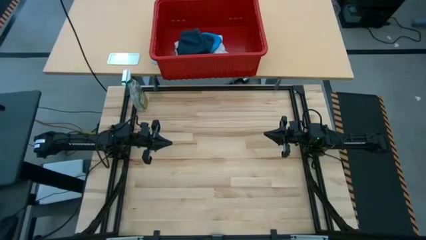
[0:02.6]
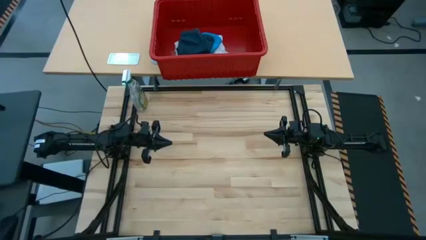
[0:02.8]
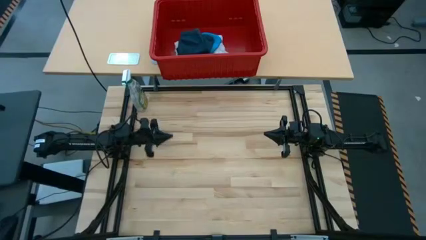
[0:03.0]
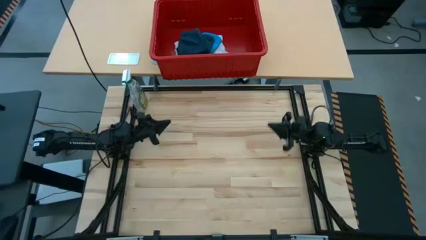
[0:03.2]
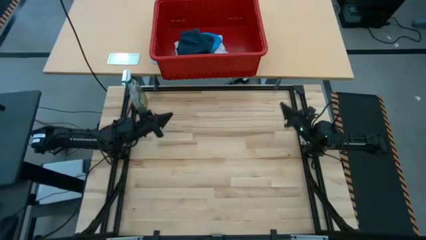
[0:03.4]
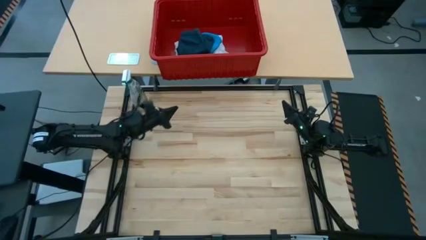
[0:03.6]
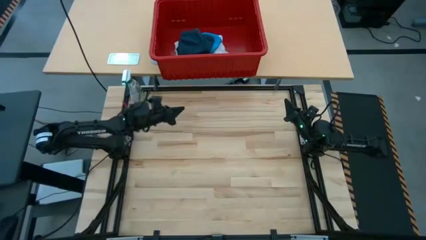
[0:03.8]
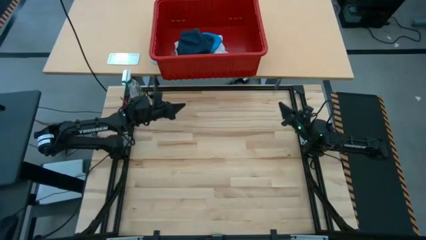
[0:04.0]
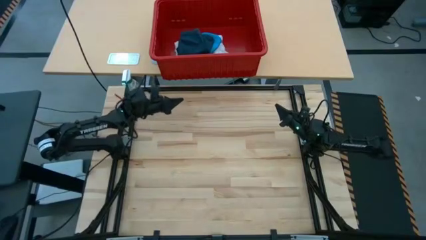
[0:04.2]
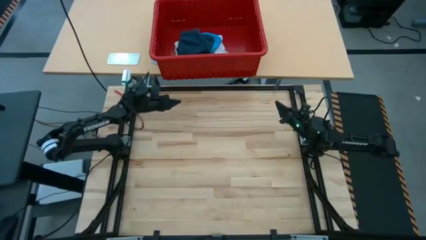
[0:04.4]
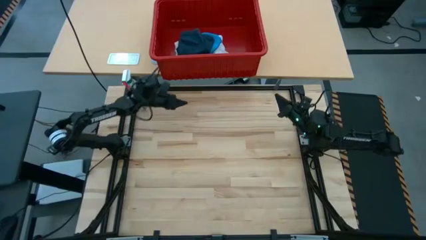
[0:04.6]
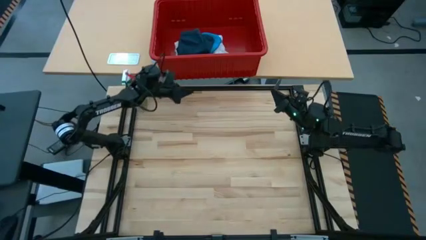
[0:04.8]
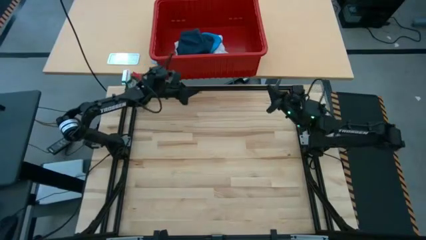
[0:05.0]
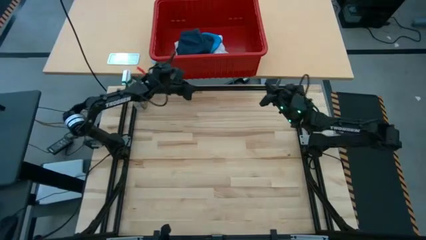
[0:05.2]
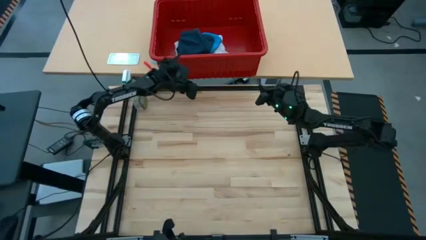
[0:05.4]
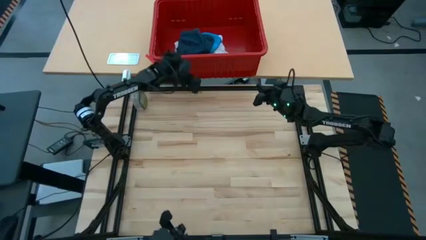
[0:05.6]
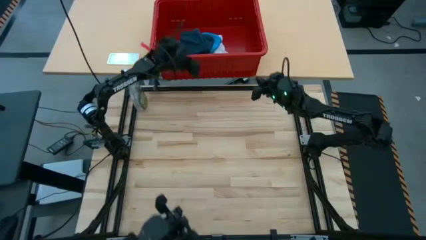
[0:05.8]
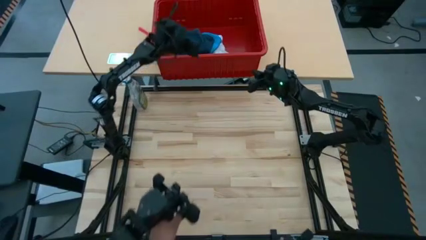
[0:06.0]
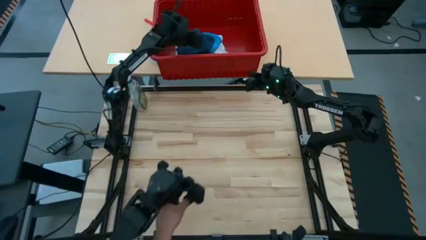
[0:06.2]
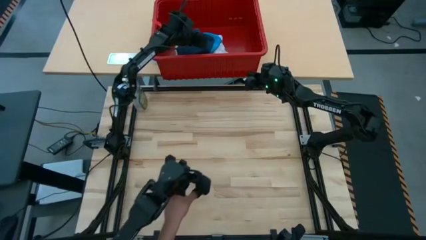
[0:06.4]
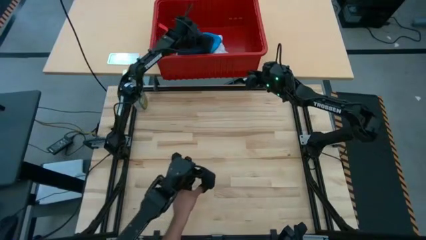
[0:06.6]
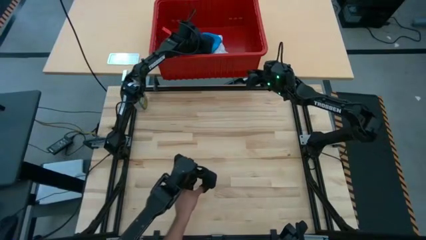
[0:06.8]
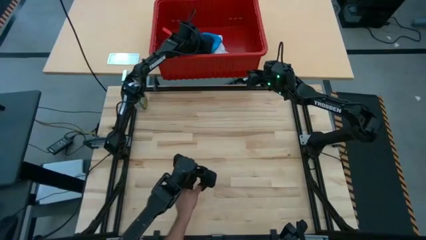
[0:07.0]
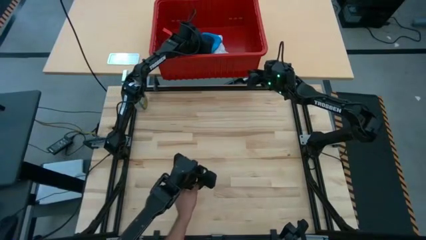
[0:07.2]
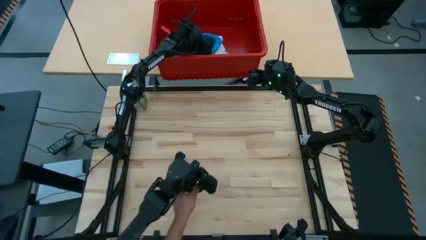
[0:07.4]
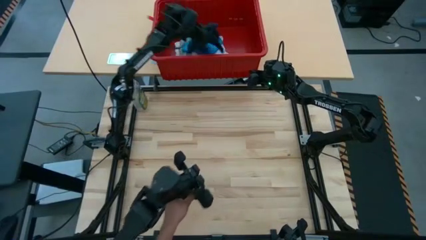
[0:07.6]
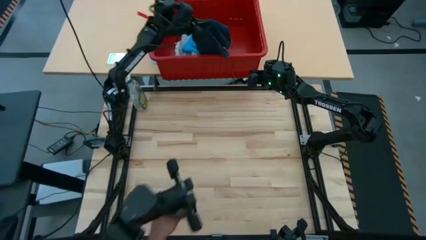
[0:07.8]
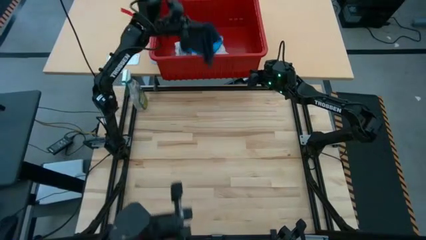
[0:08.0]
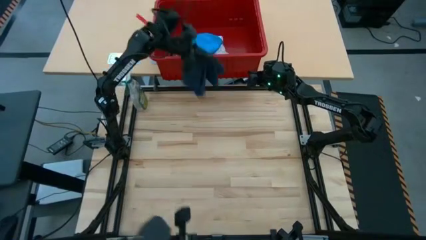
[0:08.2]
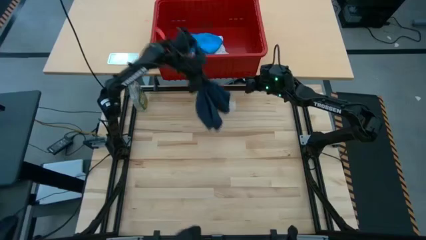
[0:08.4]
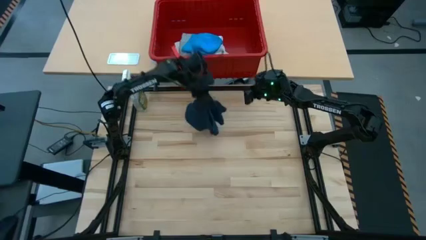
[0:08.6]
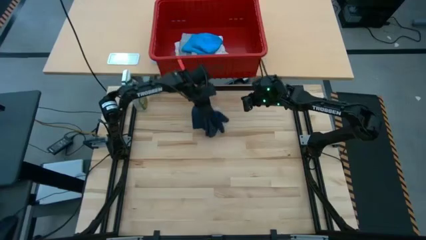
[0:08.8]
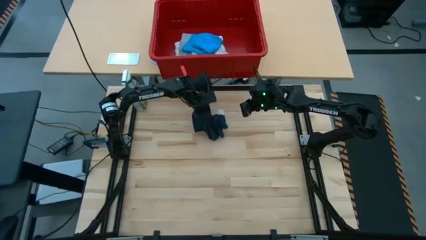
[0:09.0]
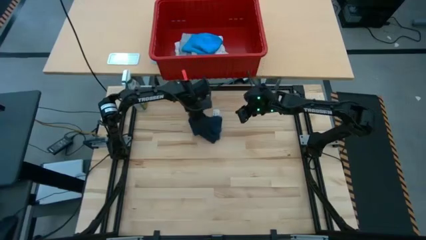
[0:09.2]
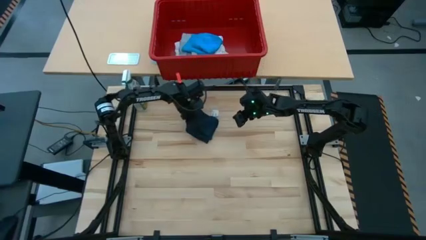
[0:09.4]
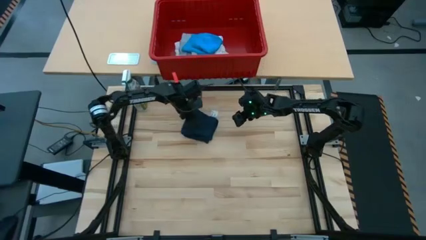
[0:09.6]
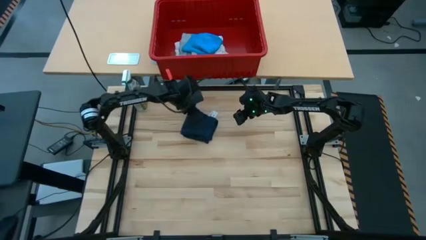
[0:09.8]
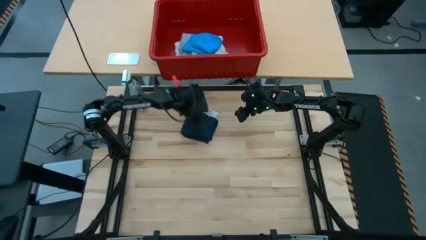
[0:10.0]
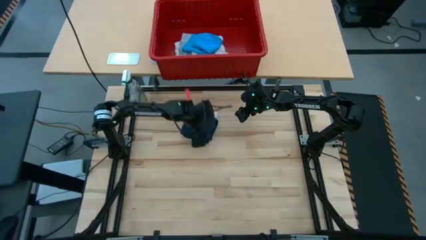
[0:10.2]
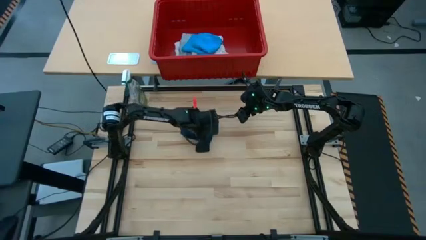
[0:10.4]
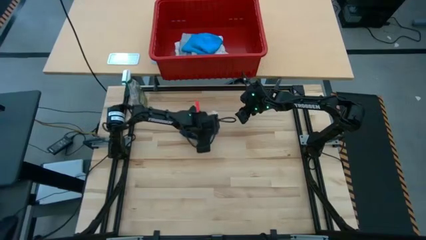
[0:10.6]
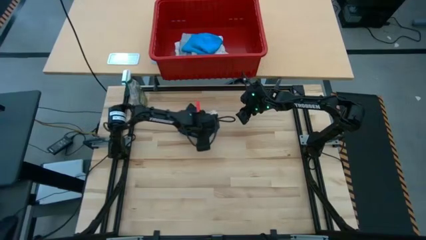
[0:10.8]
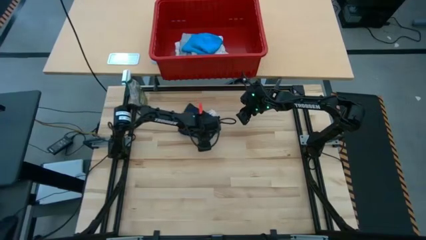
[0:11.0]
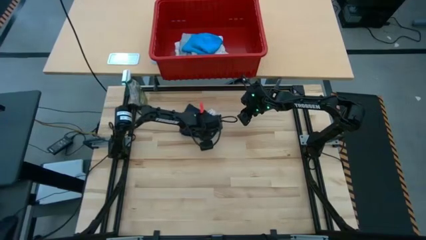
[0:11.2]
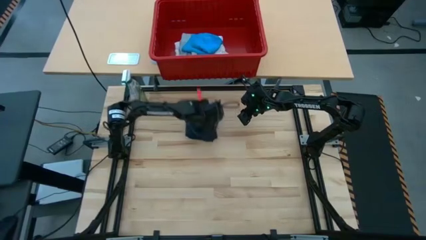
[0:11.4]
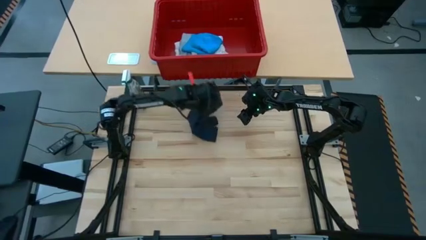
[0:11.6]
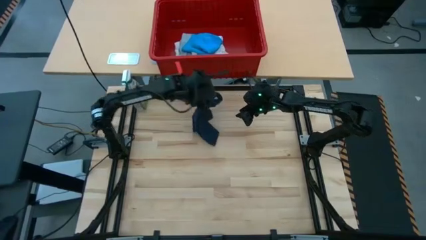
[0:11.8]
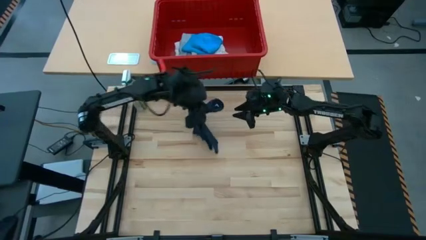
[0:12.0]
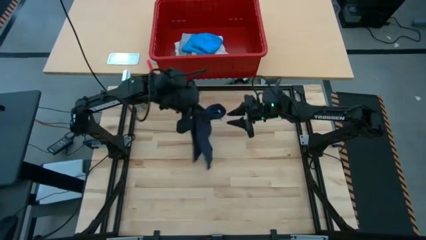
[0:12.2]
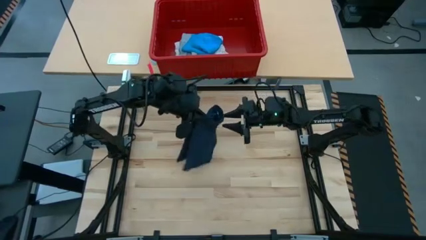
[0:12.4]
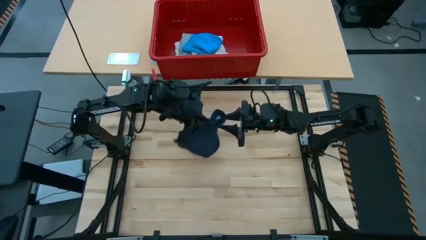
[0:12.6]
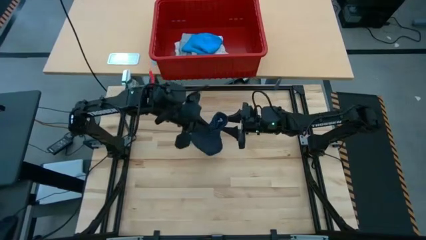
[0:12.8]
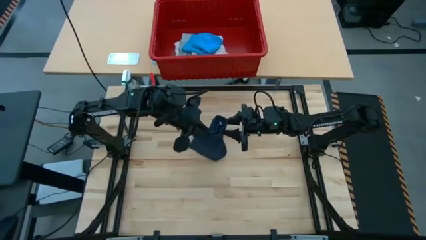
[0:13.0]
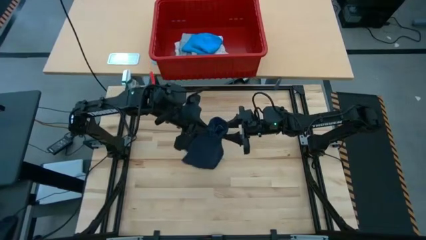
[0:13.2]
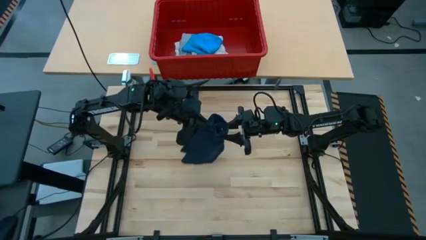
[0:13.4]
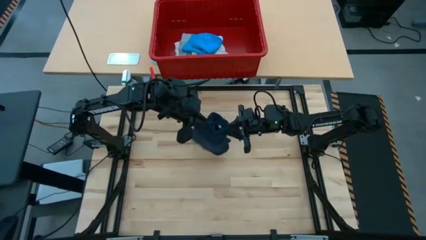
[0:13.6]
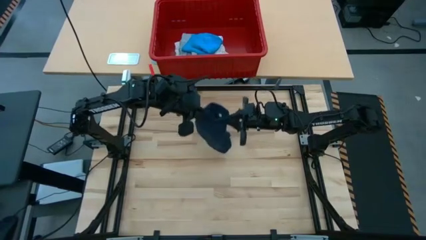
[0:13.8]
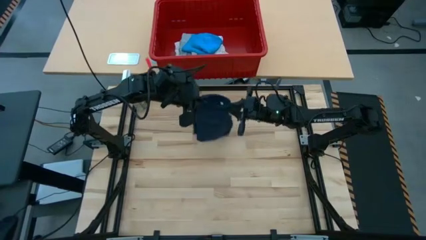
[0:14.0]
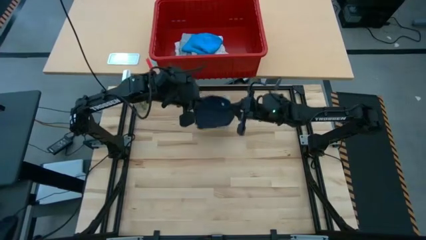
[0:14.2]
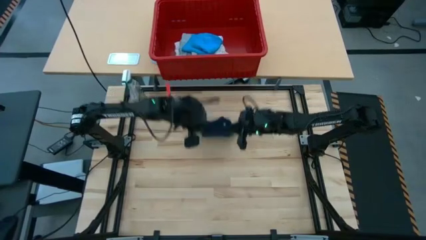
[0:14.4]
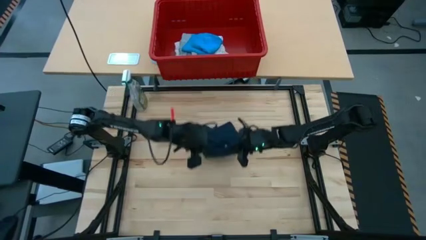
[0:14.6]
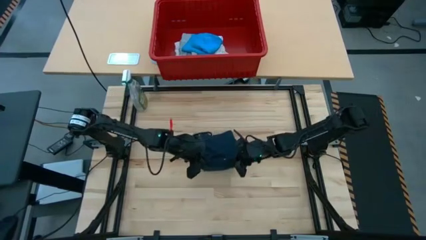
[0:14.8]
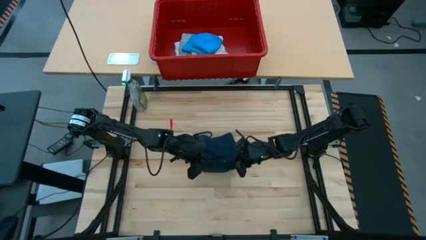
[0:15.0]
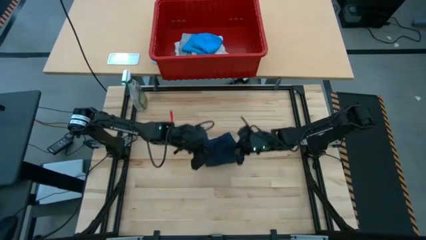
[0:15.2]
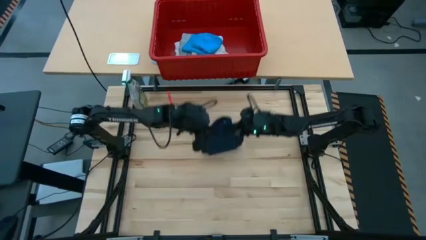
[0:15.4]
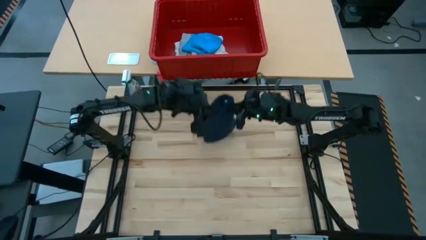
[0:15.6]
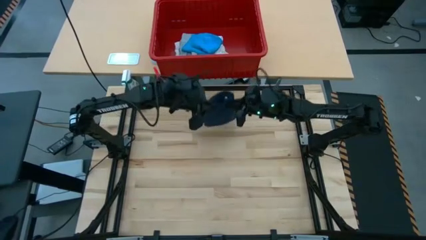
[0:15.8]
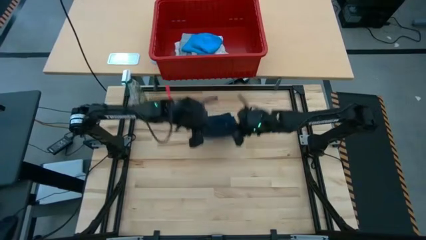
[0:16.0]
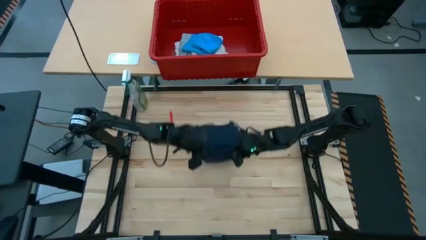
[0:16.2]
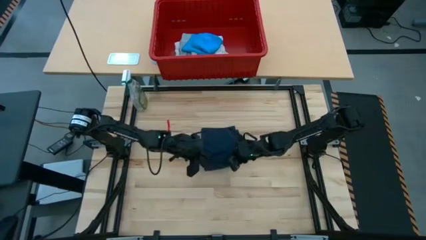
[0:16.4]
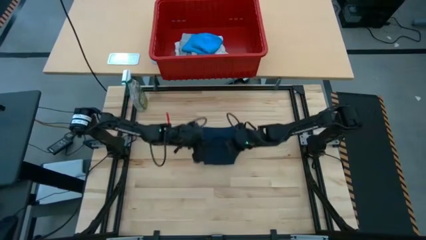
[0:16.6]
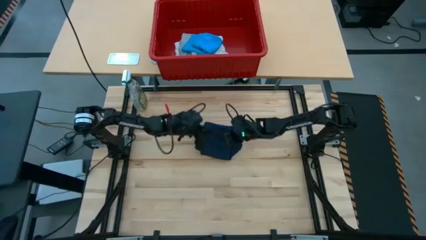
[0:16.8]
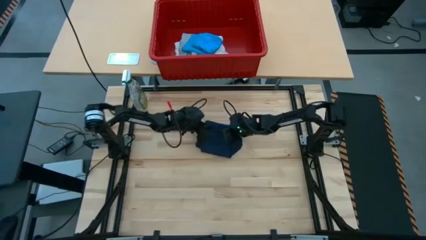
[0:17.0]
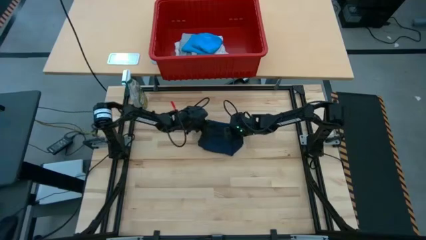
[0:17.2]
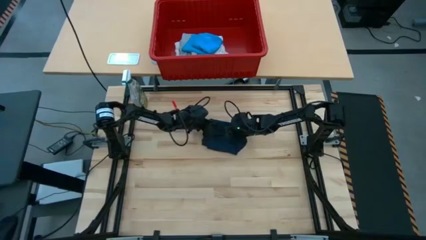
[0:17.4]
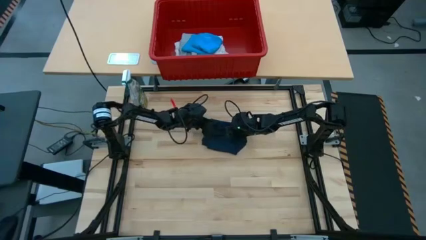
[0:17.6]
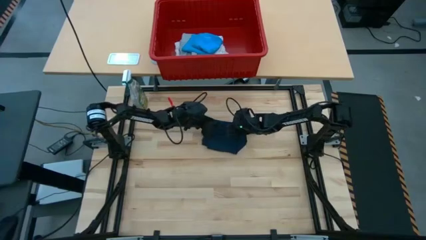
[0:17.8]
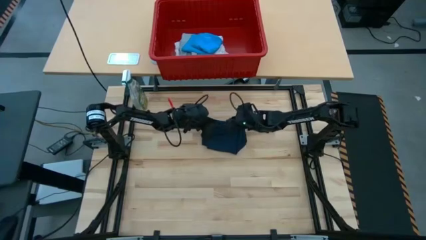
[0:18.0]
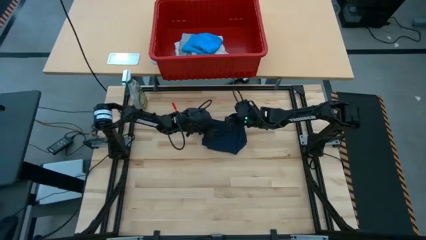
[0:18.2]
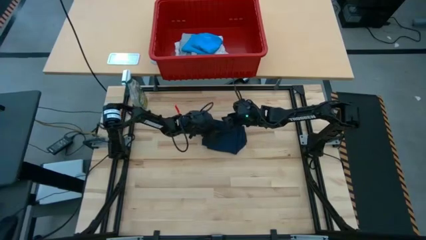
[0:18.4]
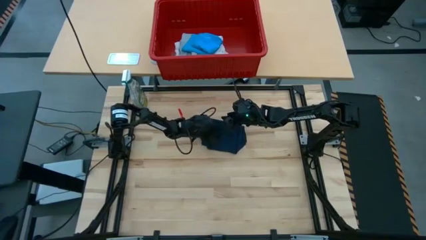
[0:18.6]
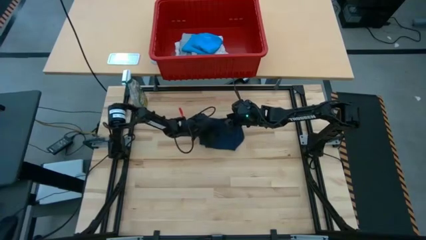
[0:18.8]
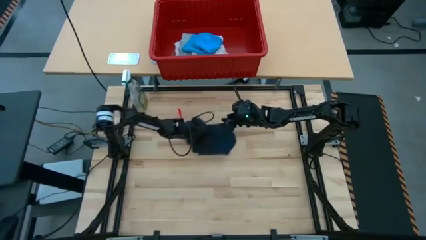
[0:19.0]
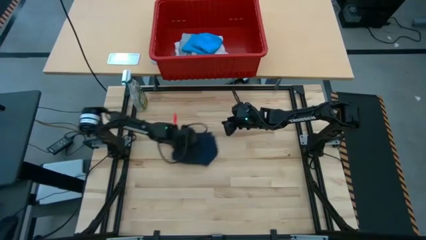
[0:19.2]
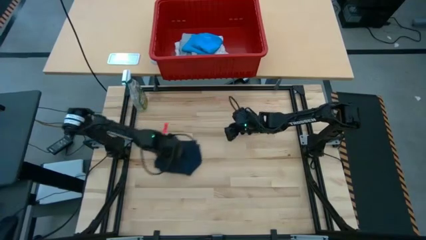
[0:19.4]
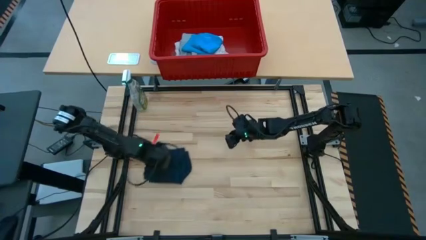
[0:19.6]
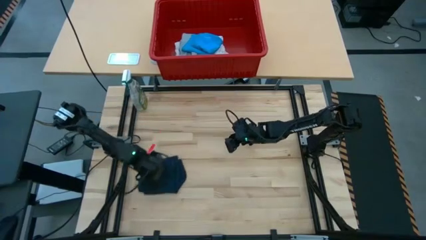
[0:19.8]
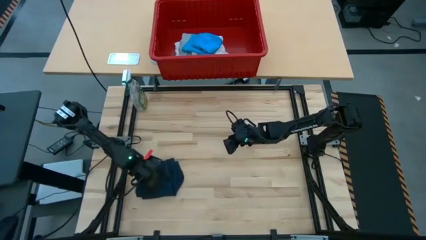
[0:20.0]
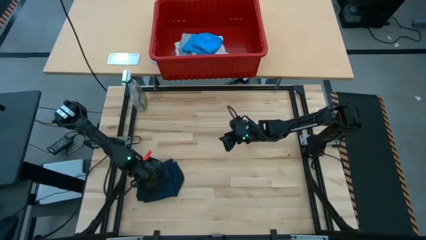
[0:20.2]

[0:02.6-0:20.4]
Task: Fold laundry
Fold the dark blue shorts
